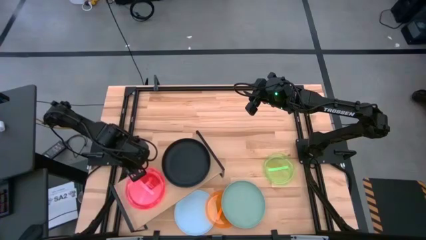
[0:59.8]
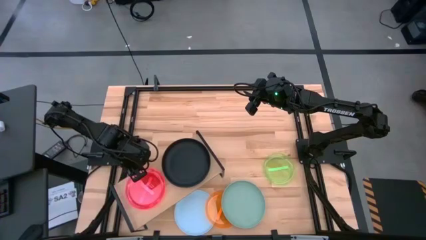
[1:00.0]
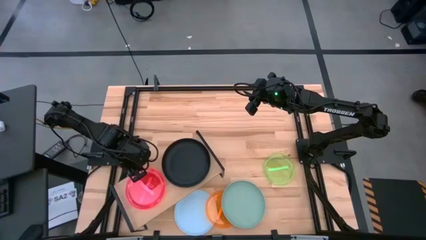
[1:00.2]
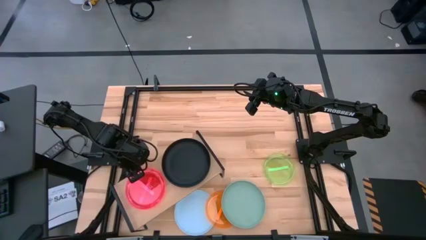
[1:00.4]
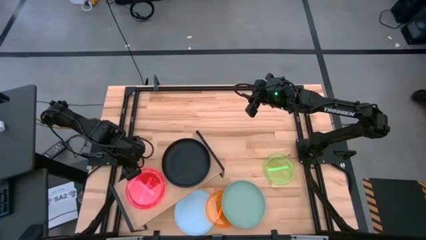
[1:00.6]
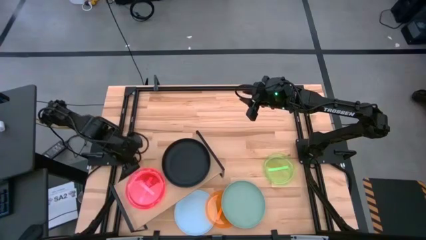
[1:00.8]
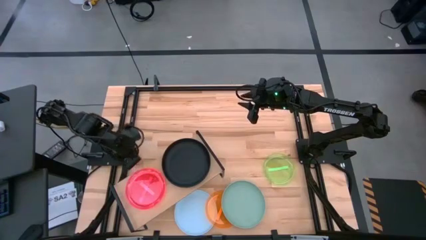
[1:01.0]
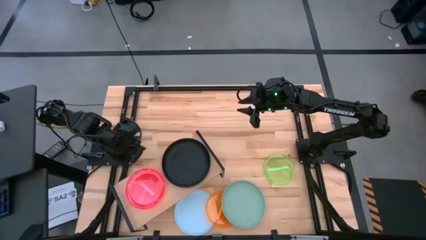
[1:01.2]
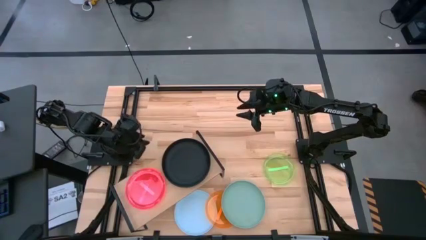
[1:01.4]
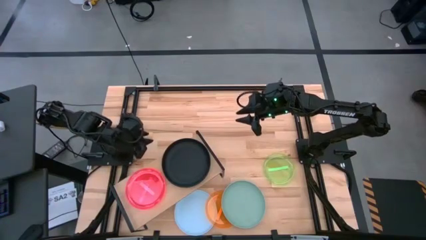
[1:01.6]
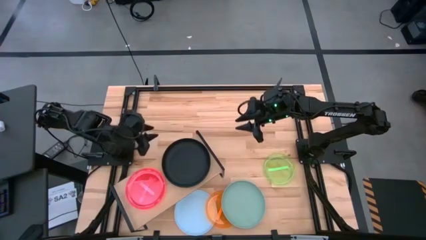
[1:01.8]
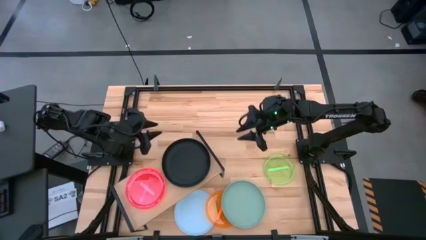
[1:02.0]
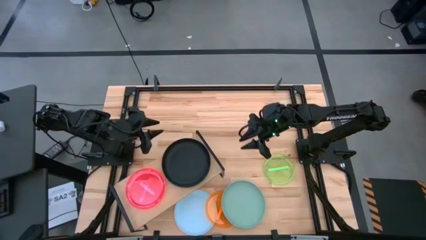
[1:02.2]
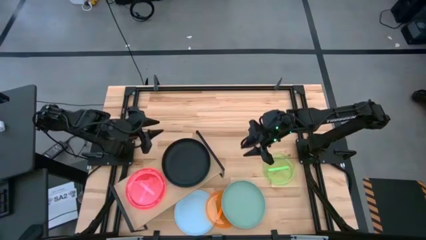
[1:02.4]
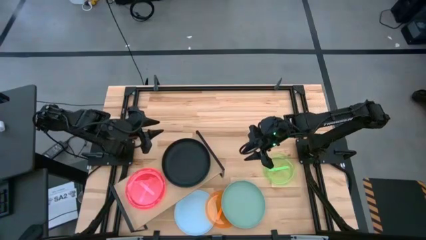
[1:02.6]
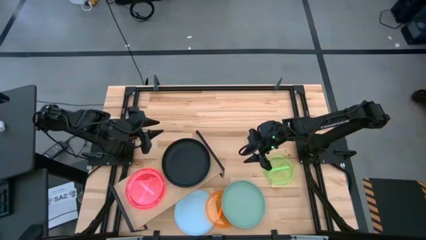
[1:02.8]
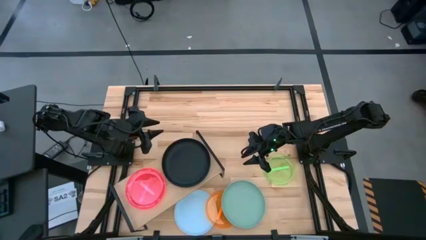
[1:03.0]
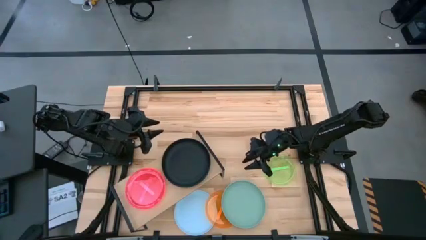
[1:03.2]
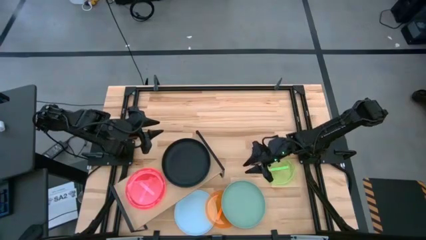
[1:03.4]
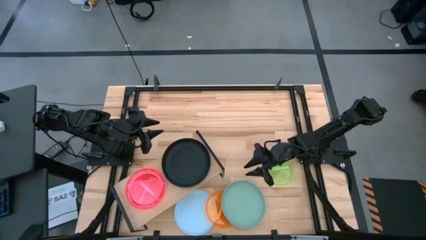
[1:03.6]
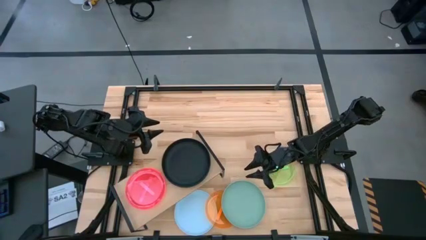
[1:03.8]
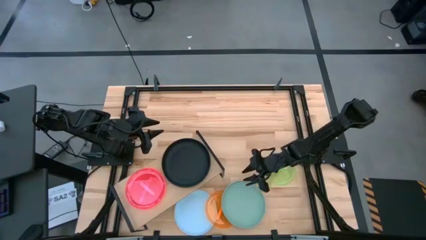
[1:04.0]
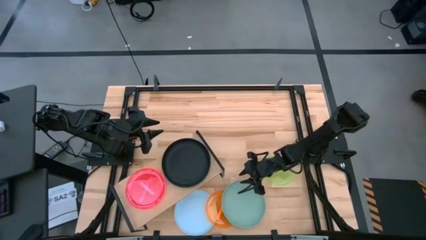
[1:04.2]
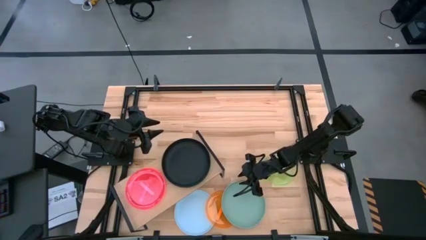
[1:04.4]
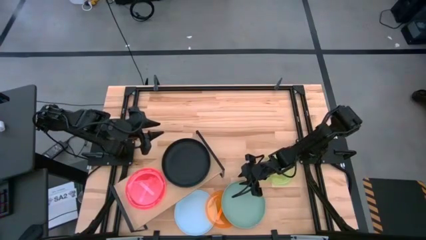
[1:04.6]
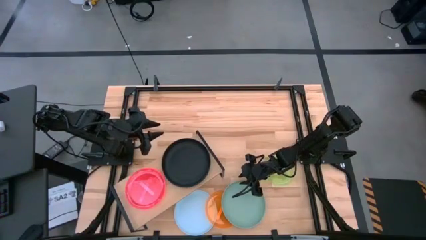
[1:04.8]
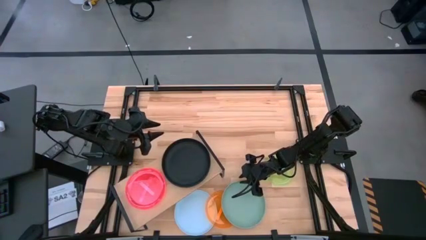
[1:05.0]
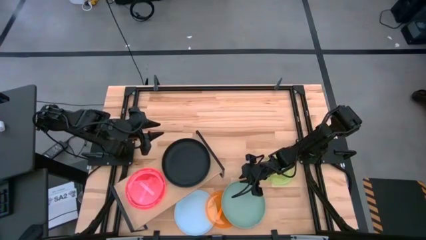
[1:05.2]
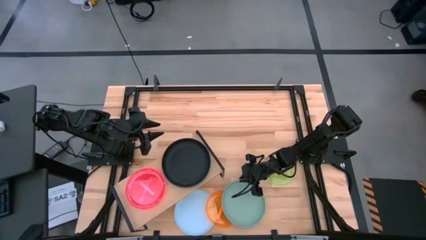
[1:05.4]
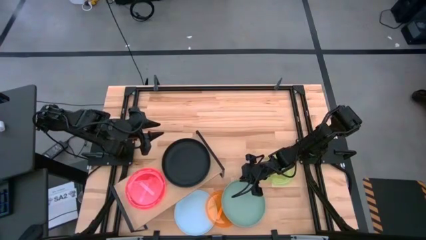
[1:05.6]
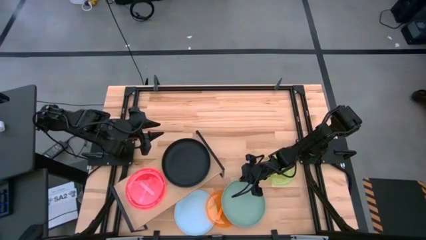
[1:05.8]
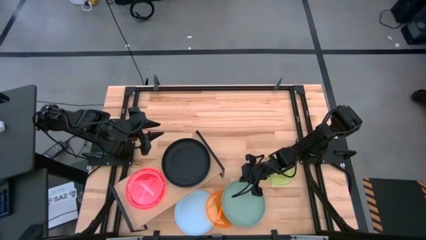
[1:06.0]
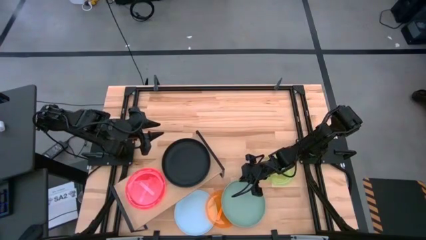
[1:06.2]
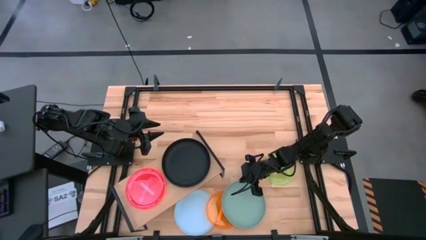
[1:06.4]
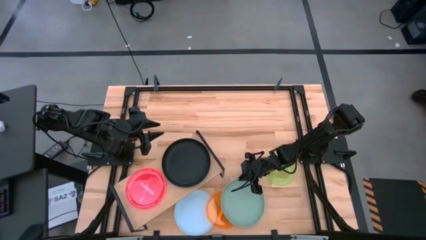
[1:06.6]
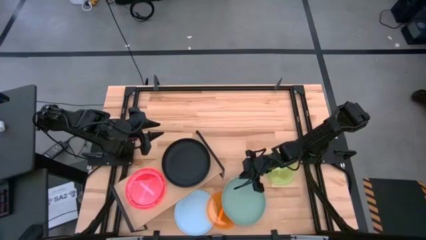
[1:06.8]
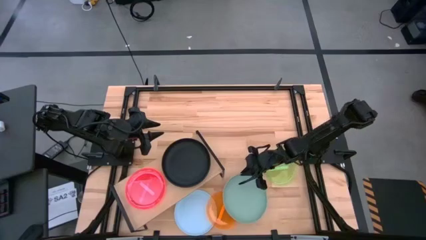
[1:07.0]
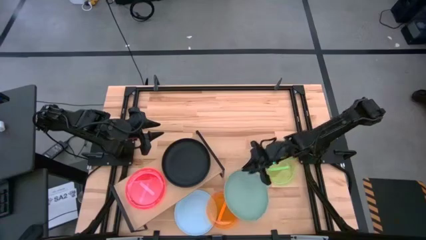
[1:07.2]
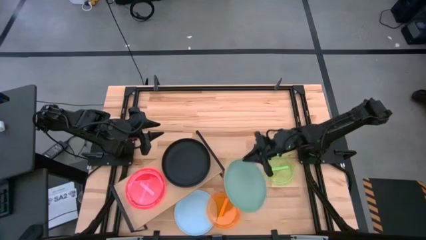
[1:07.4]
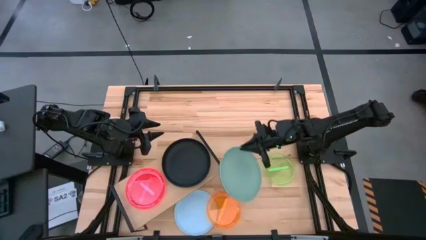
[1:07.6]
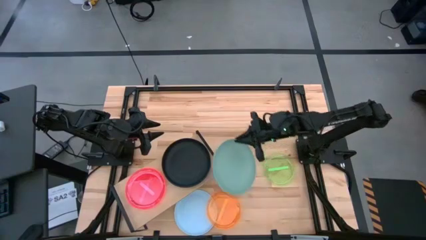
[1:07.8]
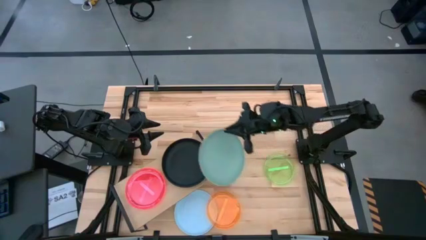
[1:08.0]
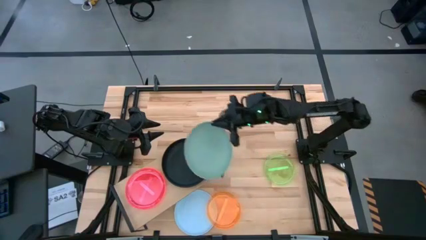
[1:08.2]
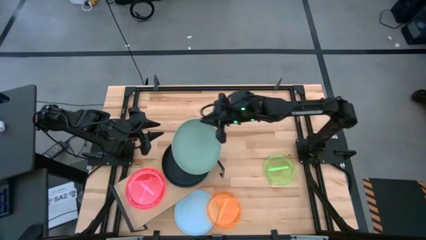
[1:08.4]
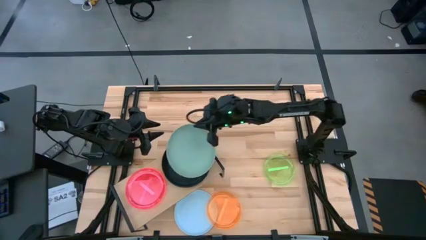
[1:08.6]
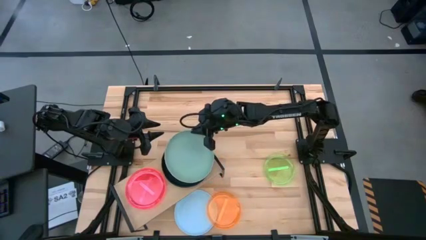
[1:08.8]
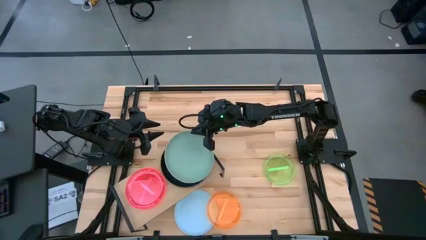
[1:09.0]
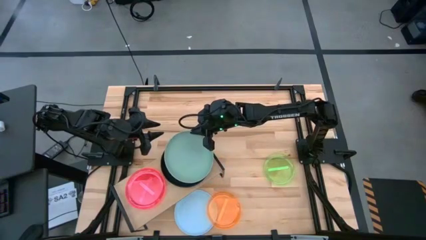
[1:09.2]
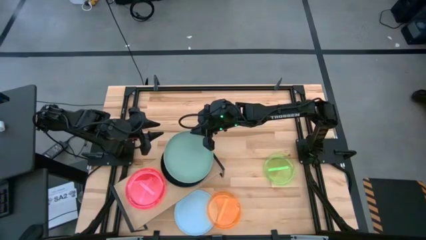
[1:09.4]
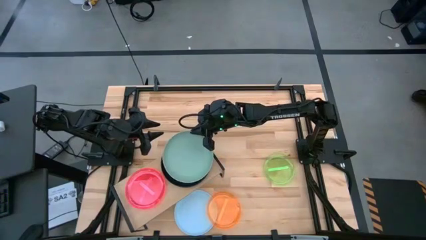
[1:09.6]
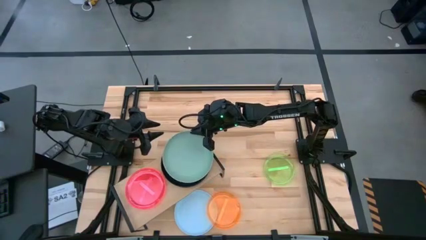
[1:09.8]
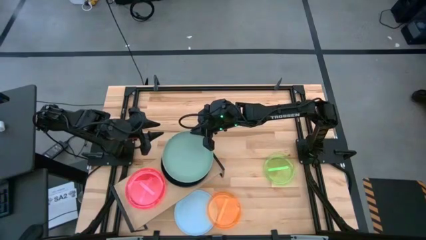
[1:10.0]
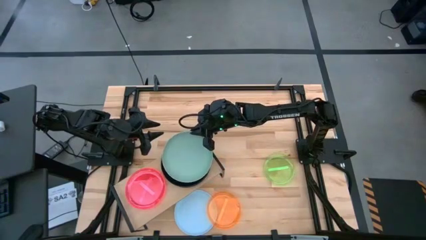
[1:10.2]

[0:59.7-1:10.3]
Task: Place and stack plates onto a shelf
Stack the blue plate on top of the black plate on the shelf

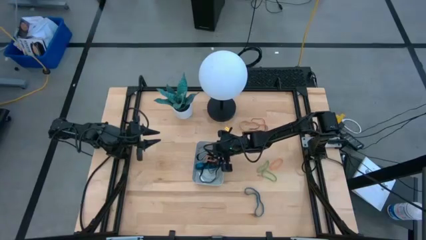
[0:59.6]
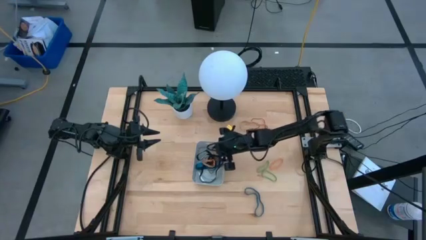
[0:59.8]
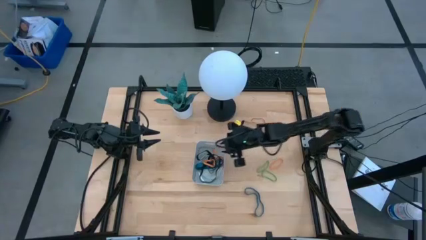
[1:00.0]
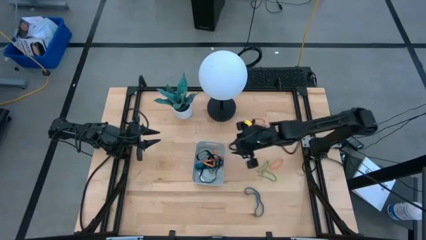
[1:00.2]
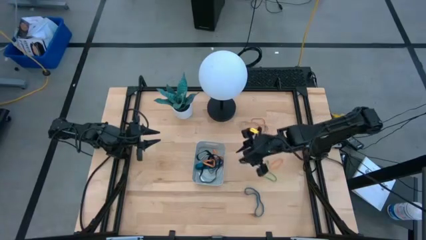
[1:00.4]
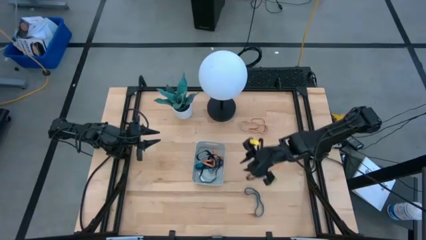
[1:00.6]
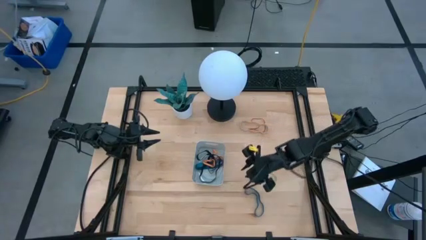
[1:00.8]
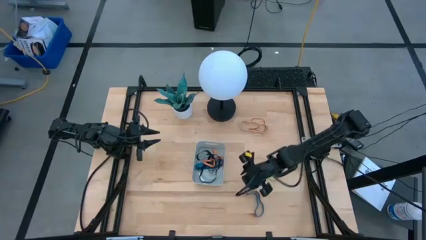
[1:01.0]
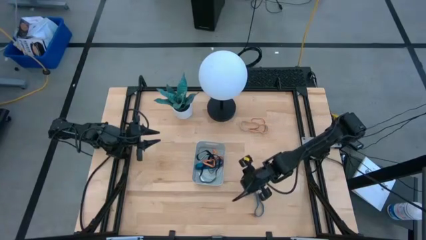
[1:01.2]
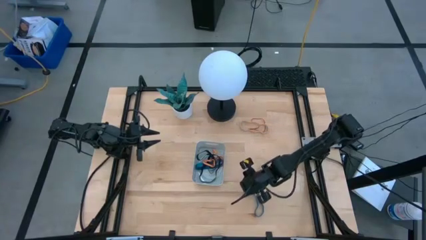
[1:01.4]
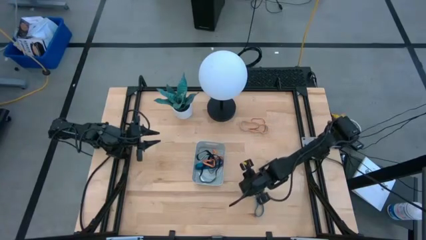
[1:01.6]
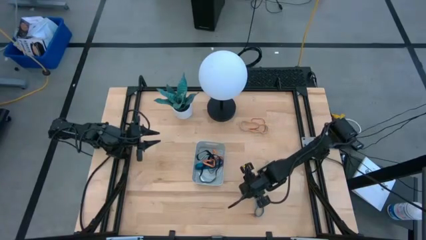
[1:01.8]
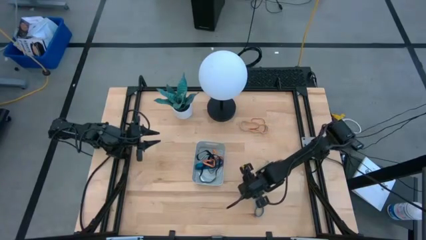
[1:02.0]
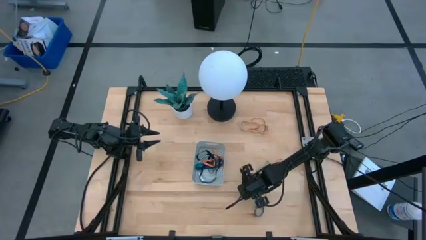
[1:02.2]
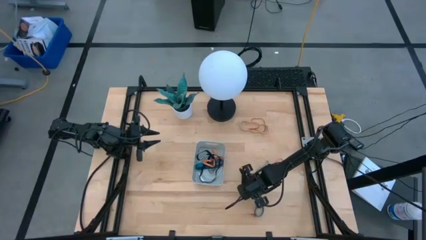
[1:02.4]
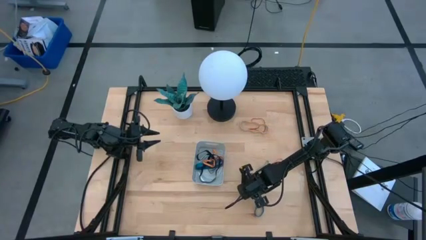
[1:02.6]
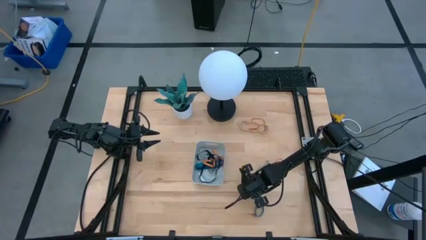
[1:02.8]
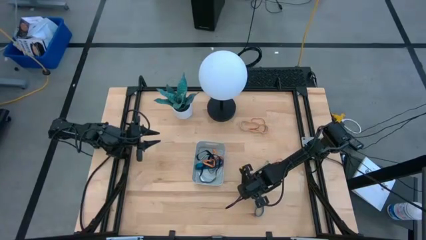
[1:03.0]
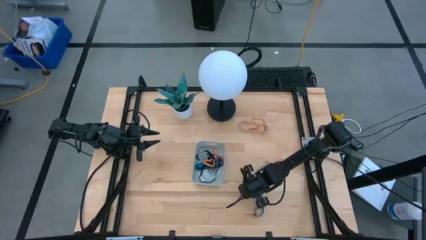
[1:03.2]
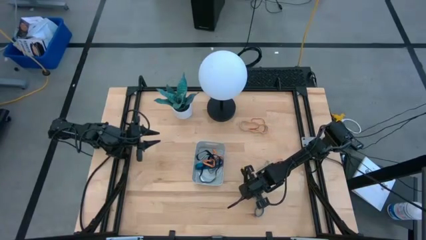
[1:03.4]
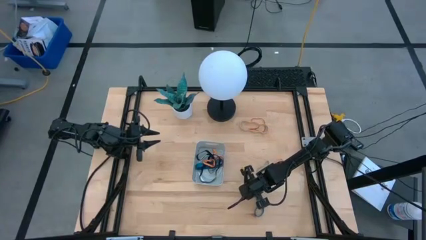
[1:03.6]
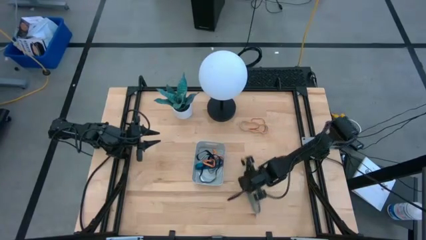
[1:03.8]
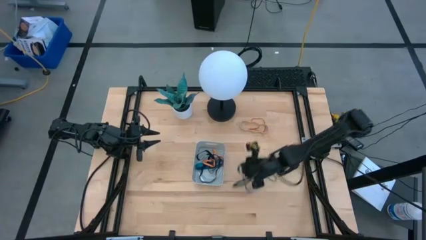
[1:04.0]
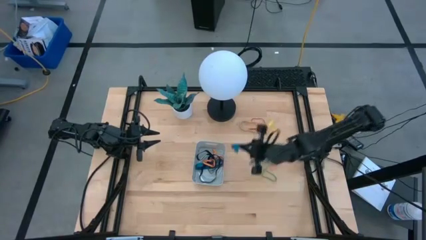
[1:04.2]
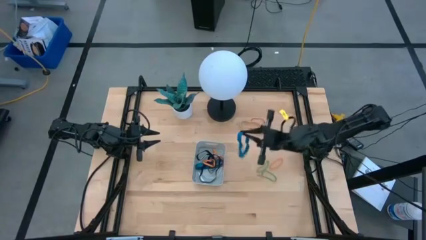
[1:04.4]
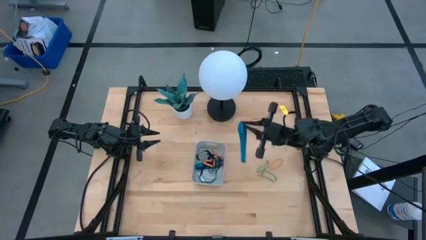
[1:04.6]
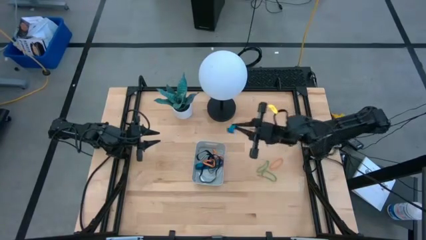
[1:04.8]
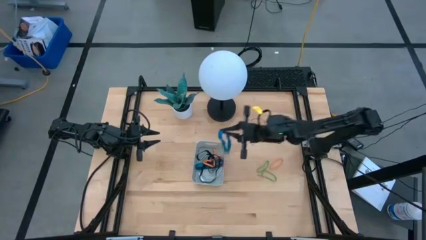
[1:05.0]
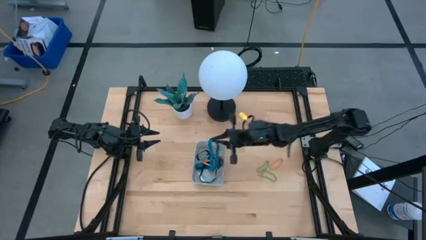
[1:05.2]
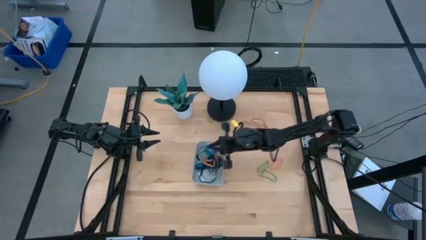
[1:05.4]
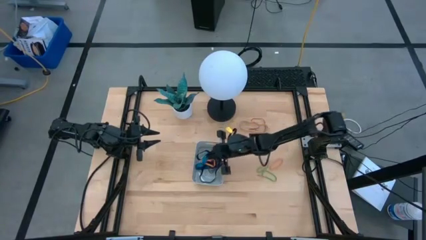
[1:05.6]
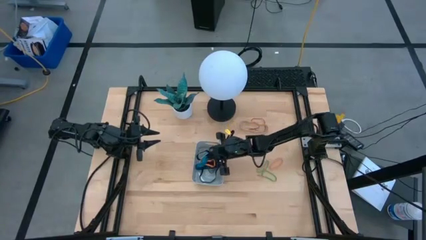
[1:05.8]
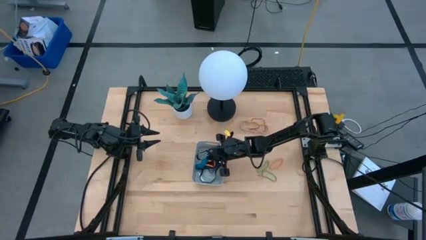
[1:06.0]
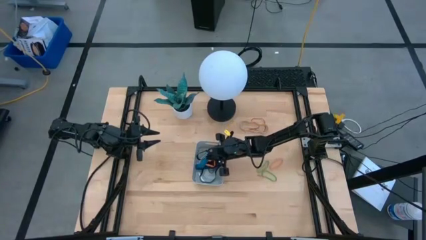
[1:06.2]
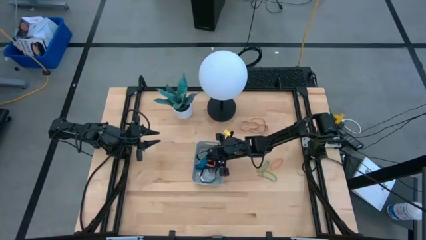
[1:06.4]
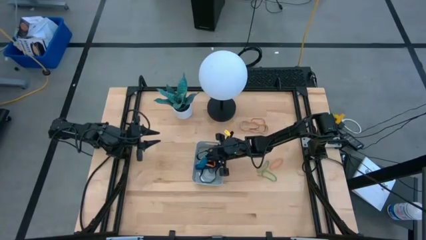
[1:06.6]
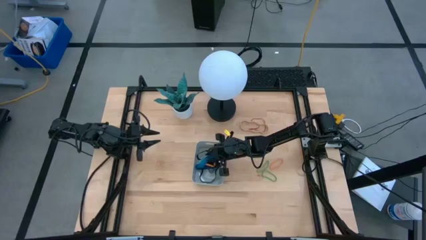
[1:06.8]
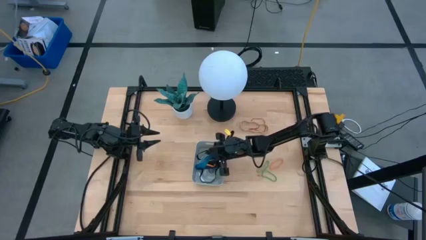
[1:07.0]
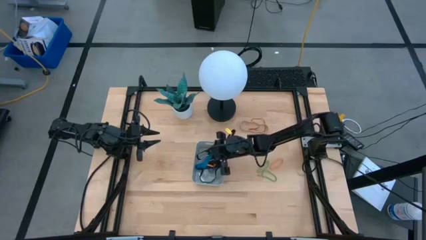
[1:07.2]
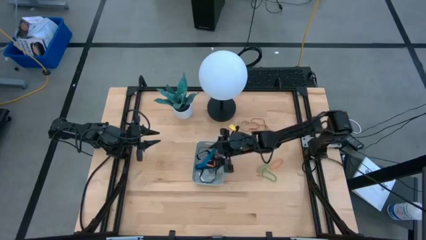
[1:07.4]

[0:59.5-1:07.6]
Task: Pick and place rubber bands into bin
Put the large blue rubber band into the gray bin
